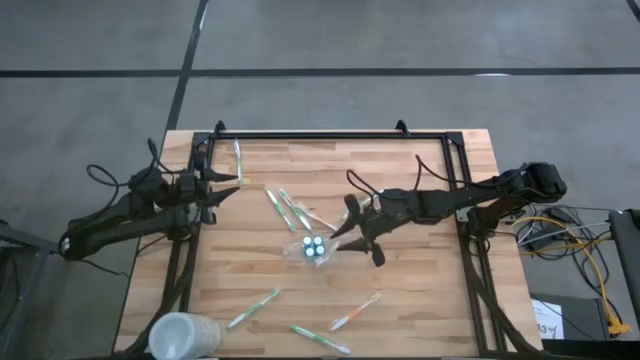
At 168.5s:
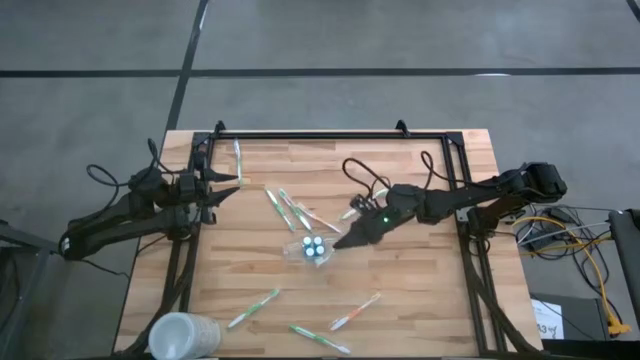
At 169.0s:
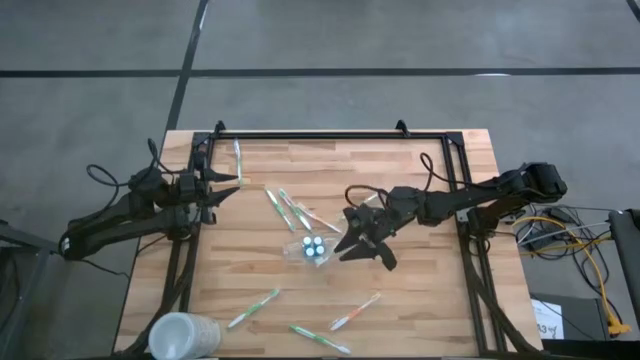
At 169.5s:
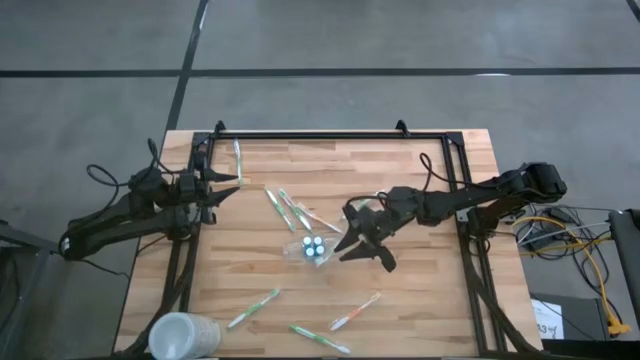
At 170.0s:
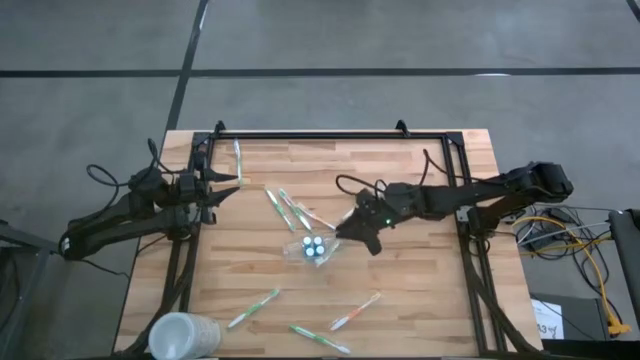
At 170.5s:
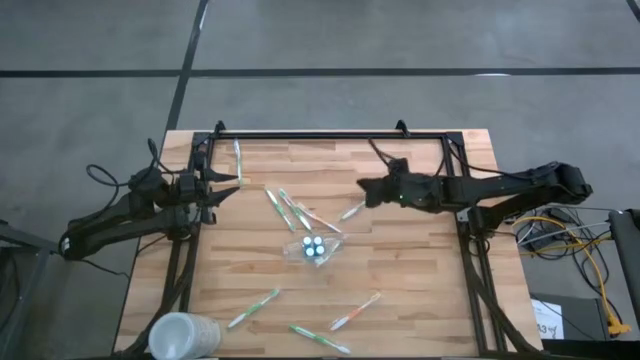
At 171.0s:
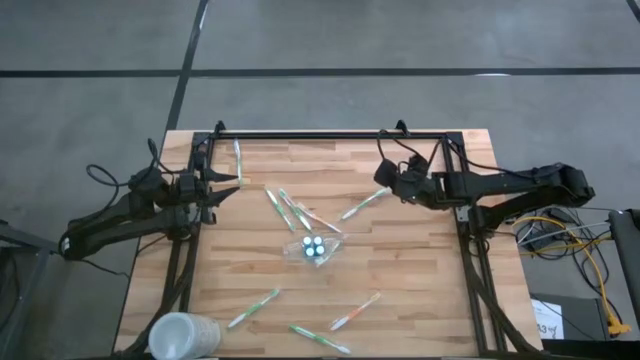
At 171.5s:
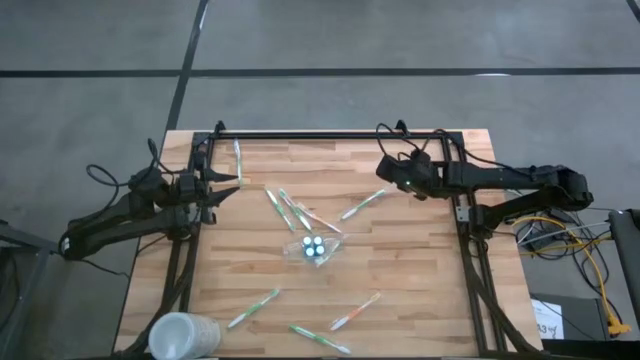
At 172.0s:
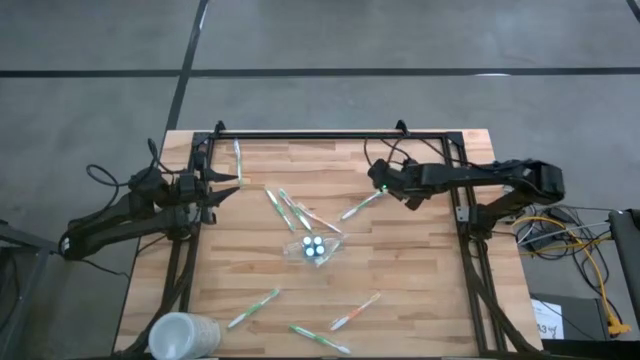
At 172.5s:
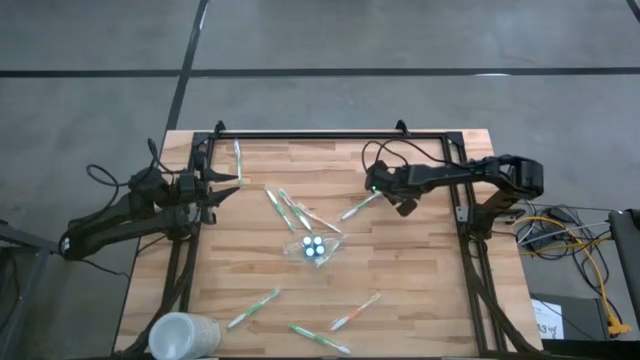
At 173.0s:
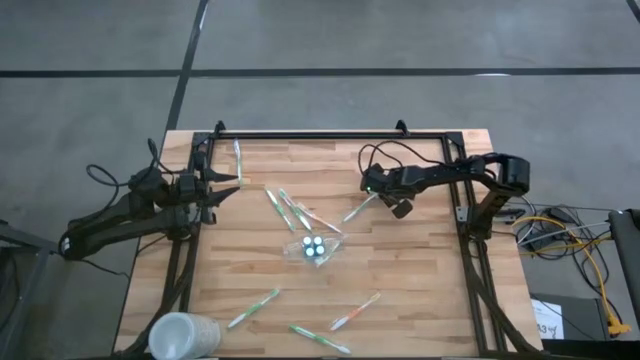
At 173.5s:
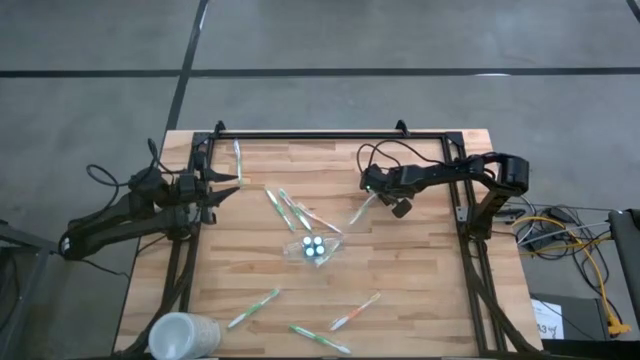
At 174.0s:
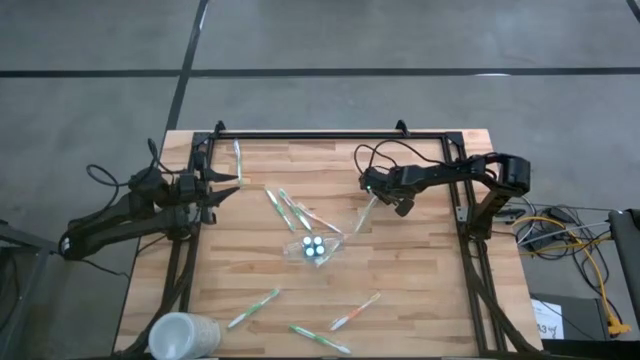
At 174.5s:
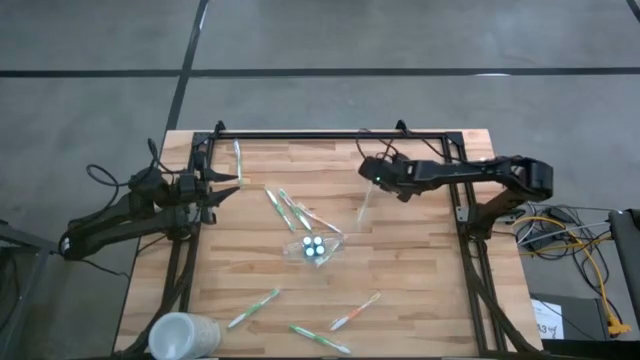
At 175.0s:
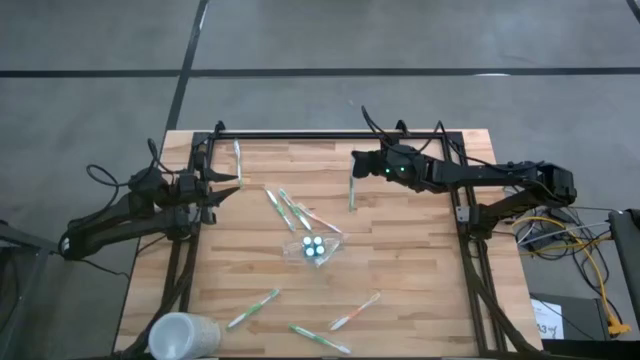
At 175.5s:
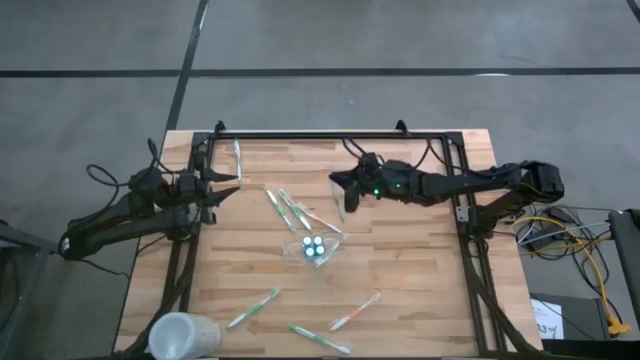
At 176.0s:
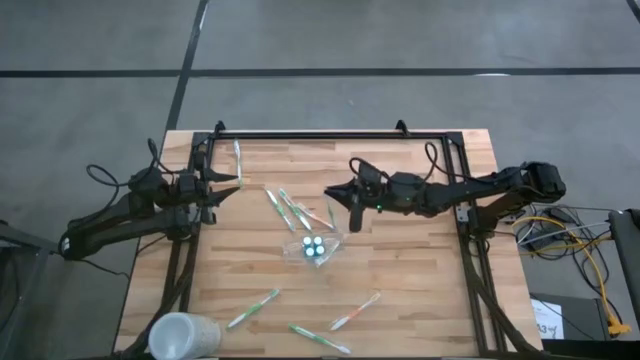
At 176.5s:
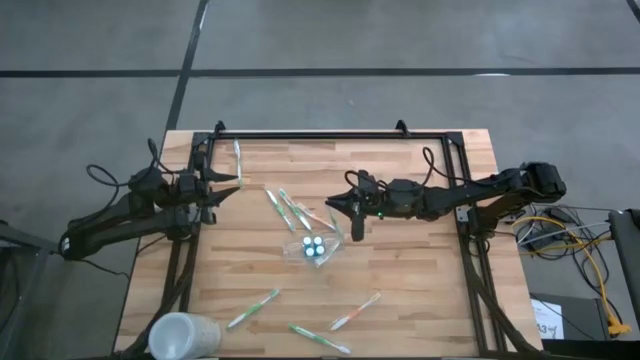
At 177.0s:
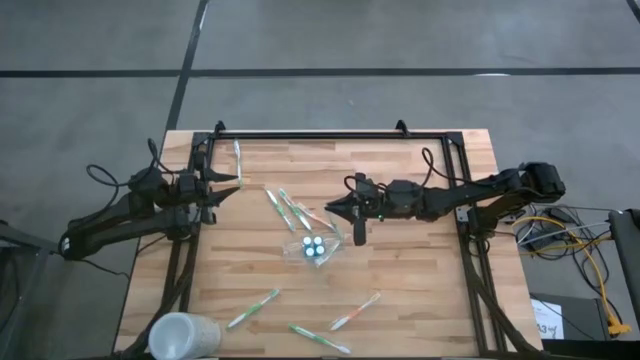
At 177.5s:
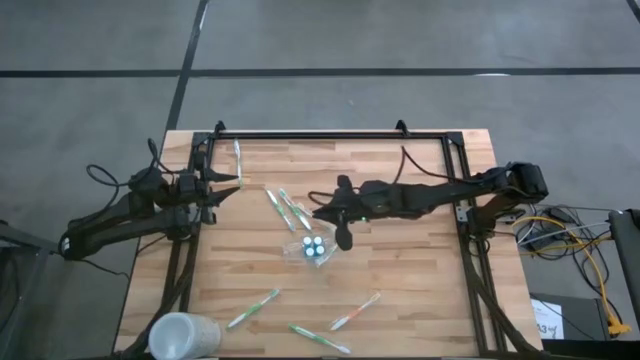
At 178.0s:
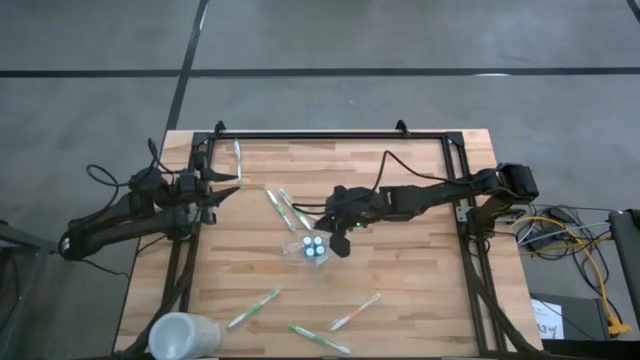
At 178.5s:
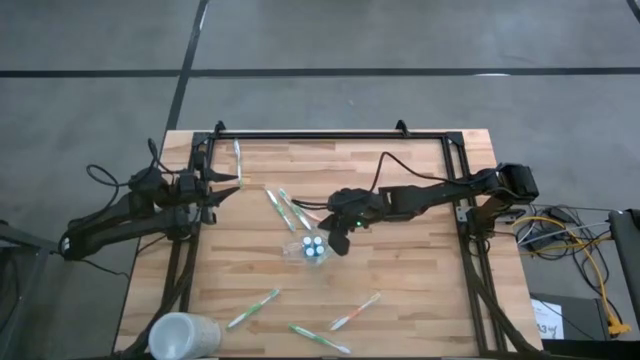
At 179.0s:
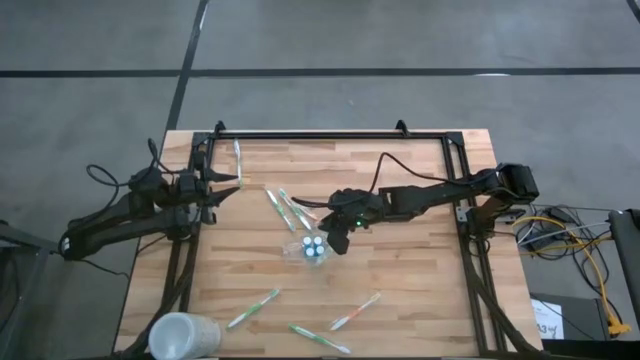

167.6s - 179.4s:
Task: Pick & Place toothbrushing station
Put the green toothbrush into the transparent organizer

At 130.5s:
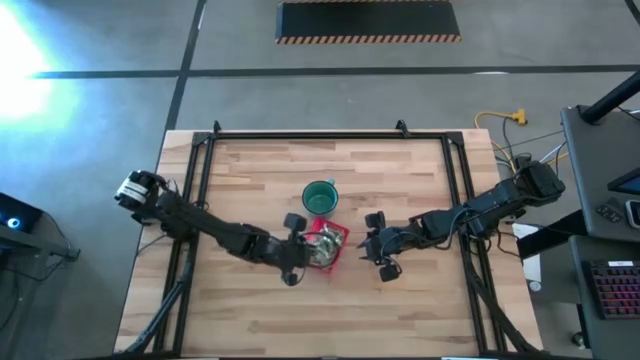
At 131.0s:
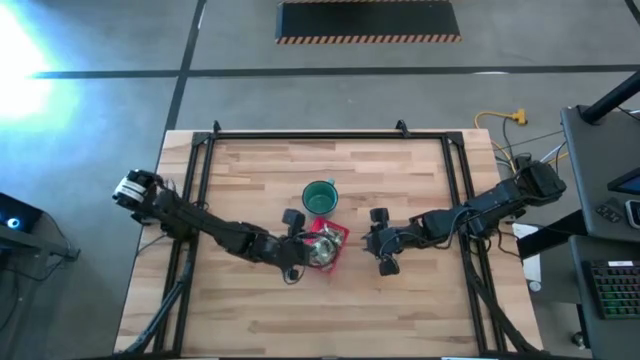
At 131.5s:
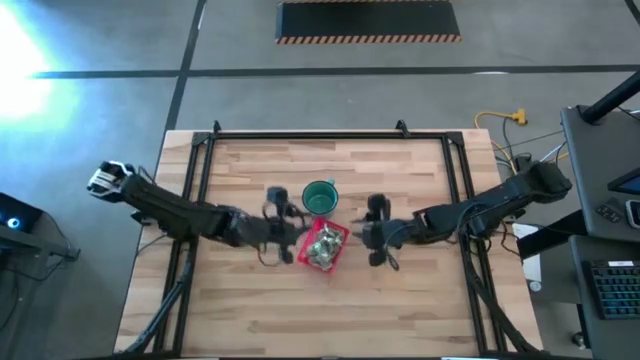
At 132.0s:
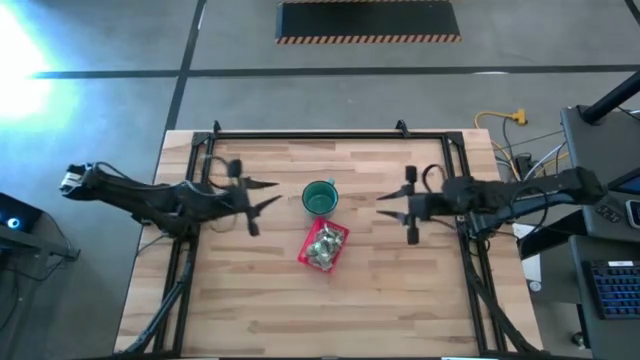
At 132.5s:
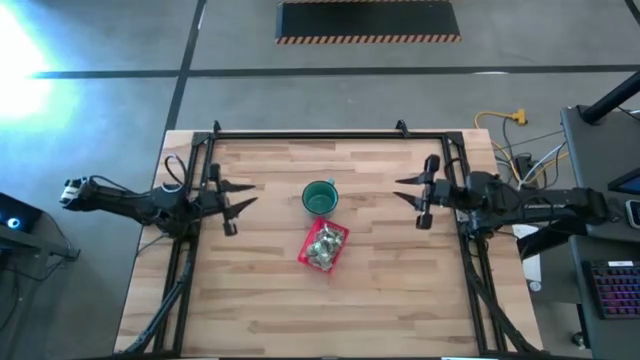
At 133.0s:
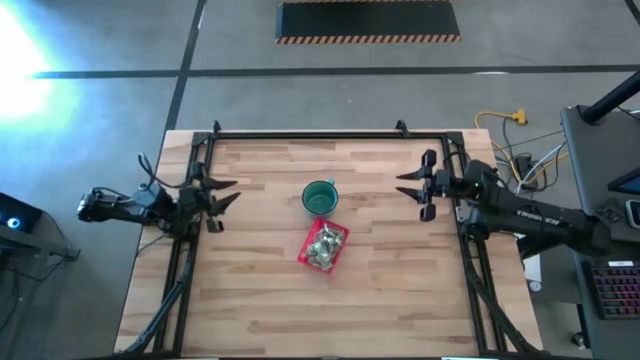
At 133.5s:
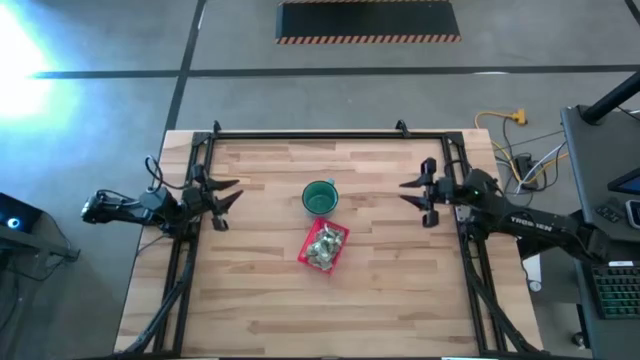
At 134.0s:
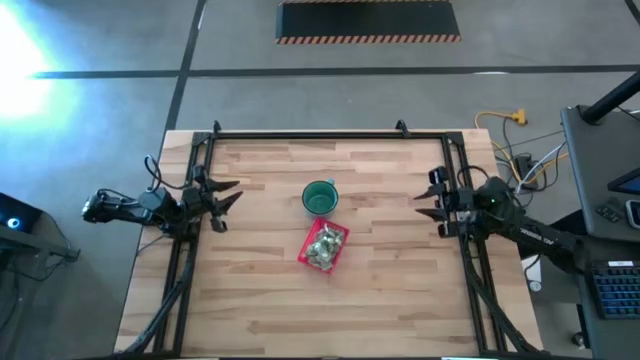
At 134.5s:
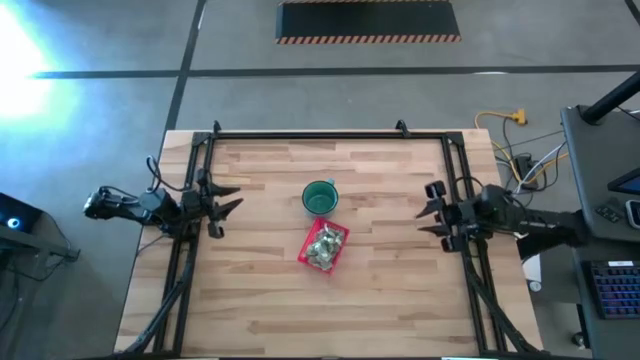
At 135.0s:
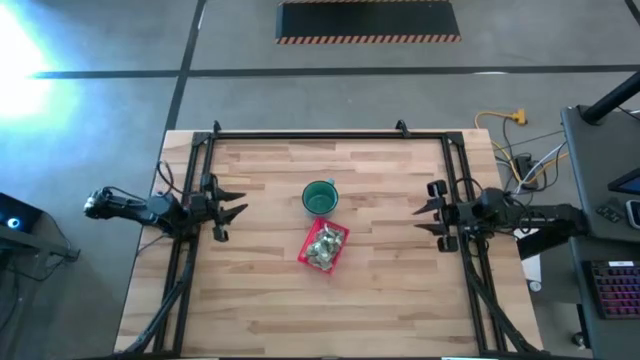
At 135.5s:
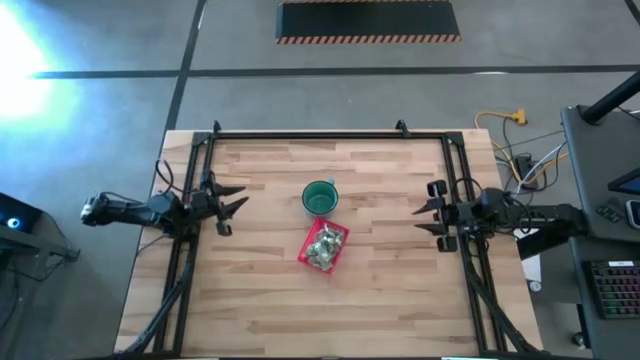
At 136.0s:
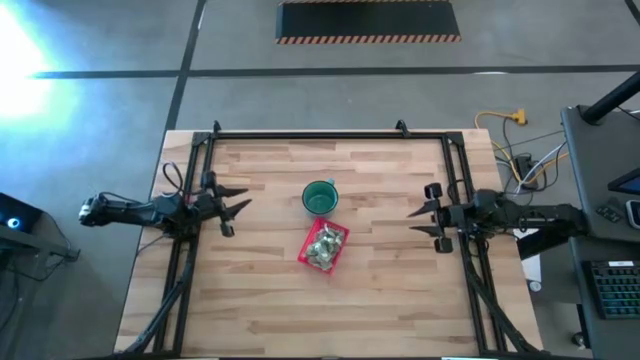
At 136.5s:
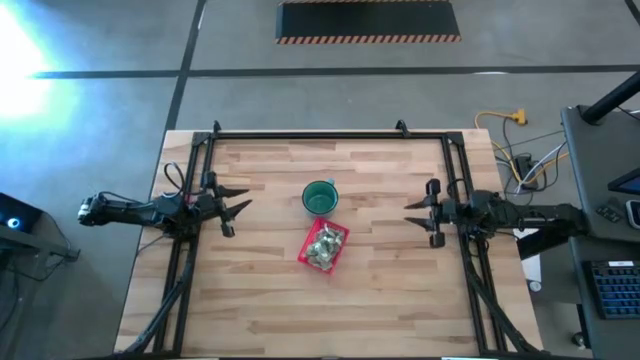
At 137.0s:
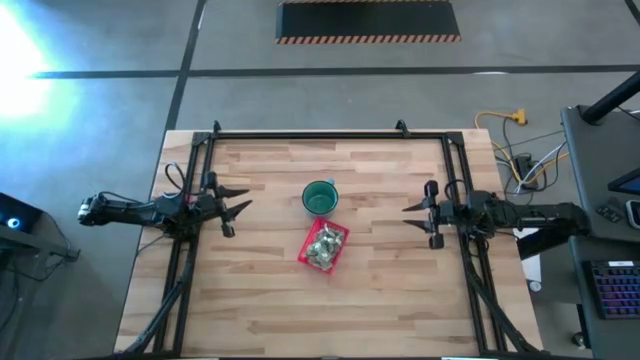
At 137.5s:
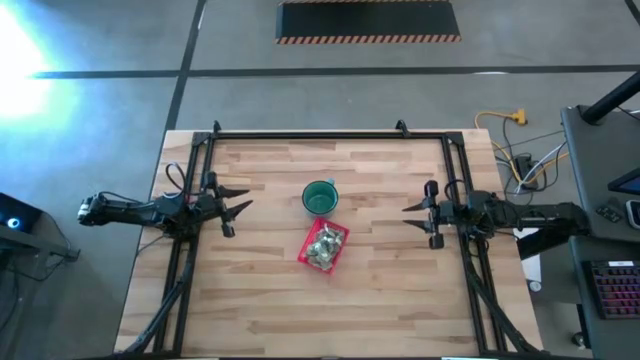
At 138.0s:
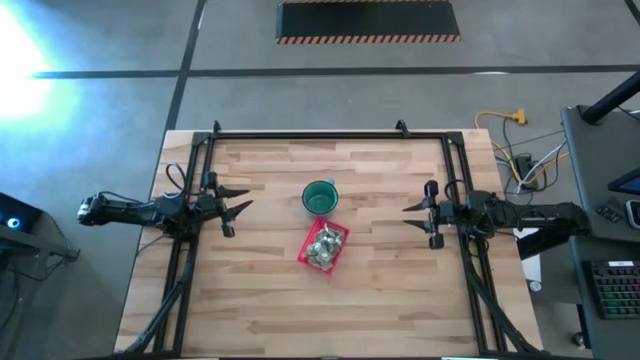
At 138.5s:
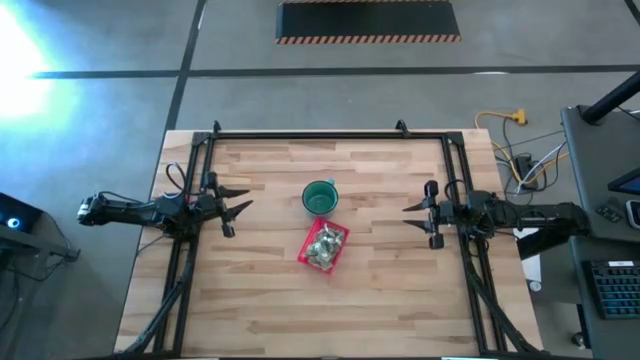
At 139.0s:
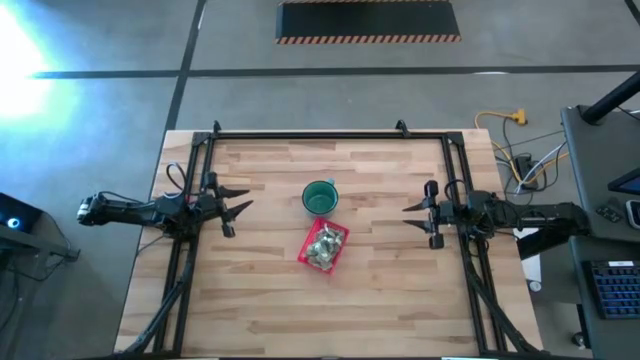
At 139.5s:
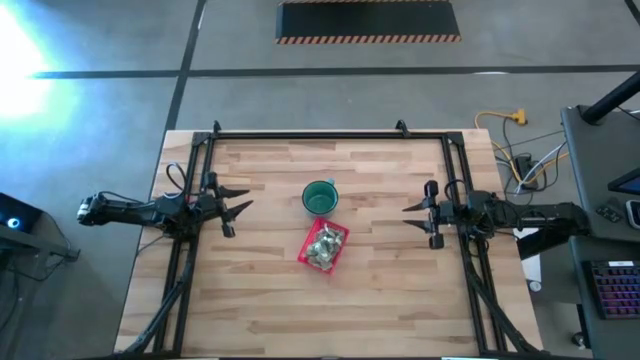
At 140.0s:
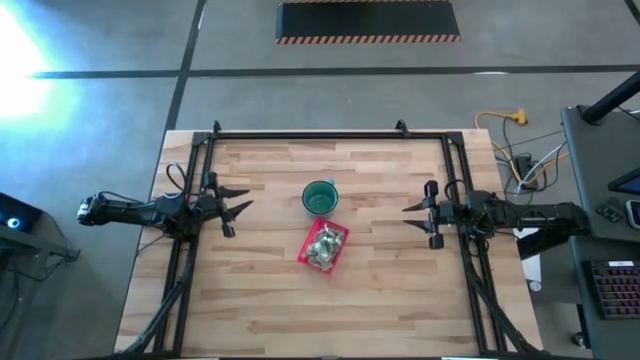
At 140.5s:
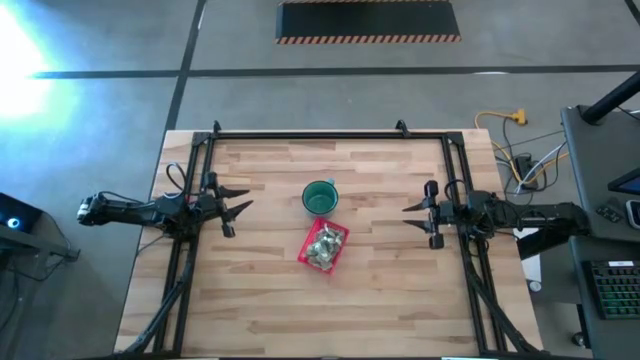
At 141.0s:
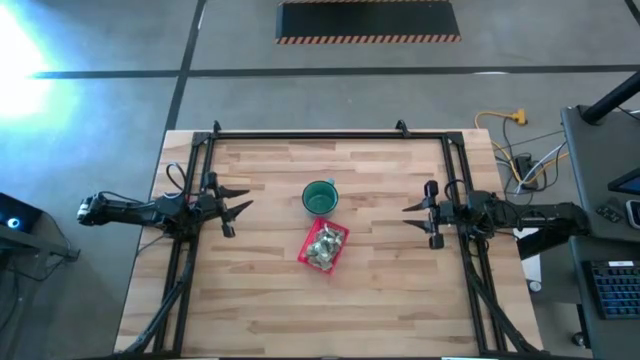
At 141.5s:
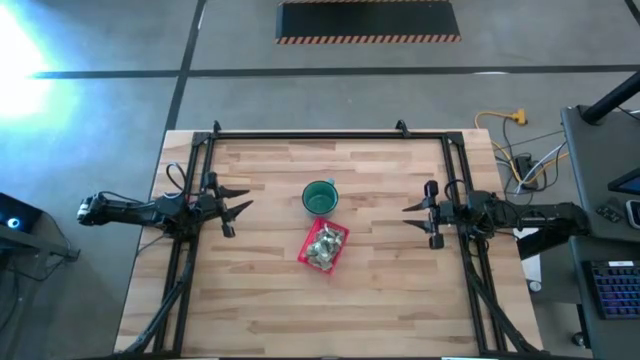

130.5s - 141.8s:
Task: Pick and place items into bin
Return to Home Position
